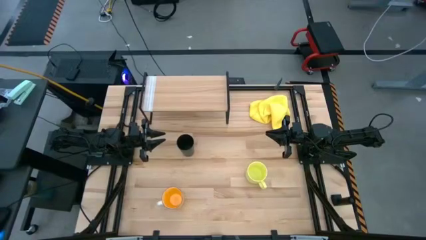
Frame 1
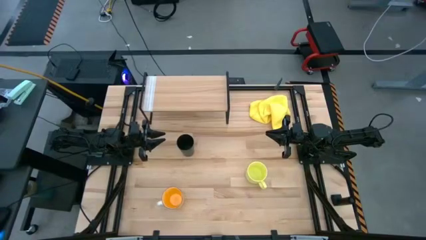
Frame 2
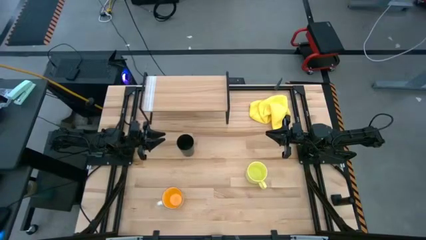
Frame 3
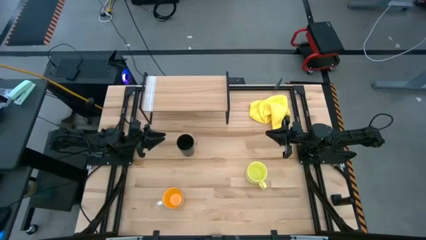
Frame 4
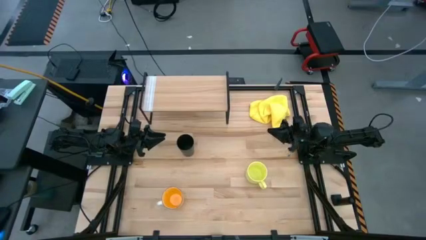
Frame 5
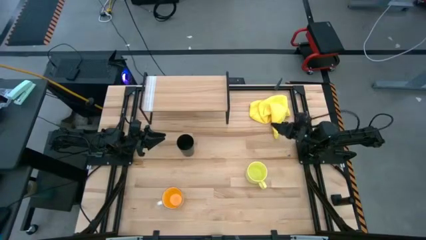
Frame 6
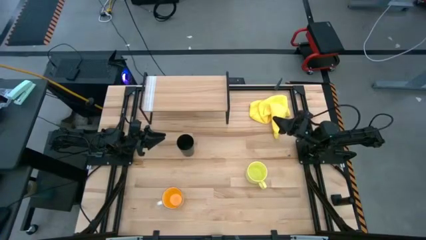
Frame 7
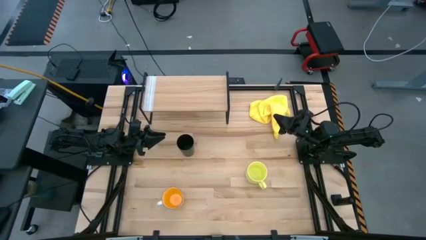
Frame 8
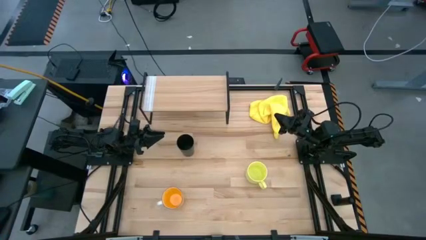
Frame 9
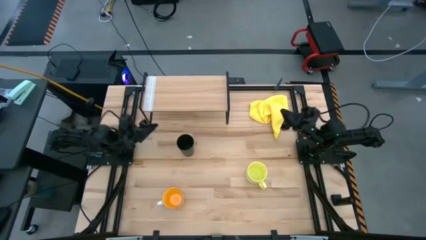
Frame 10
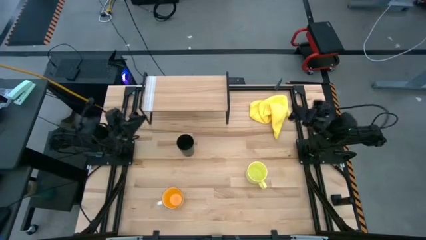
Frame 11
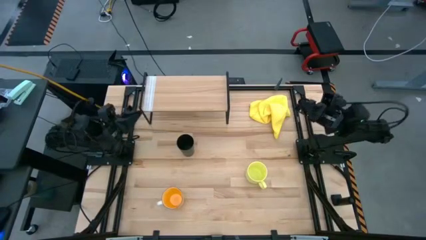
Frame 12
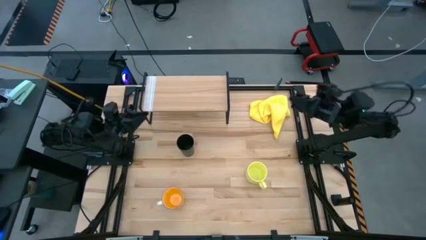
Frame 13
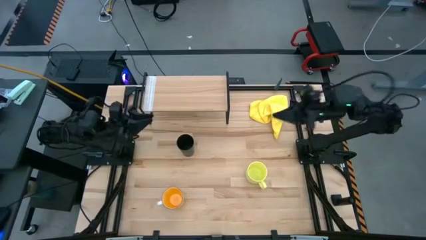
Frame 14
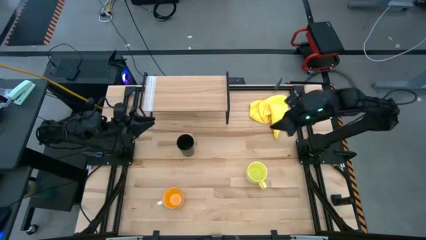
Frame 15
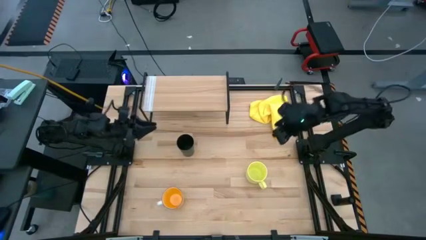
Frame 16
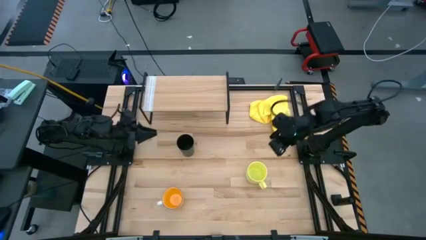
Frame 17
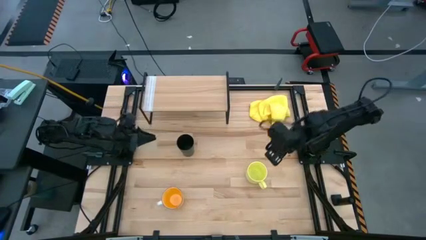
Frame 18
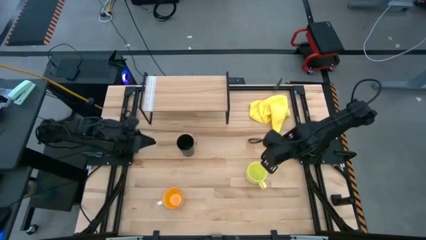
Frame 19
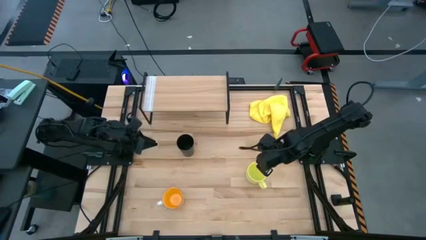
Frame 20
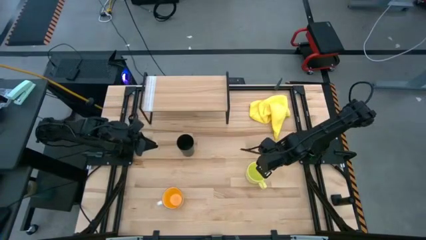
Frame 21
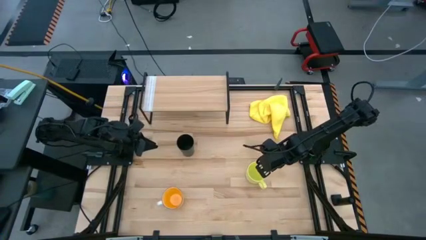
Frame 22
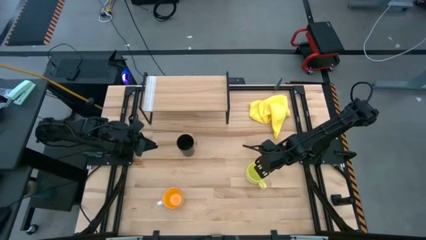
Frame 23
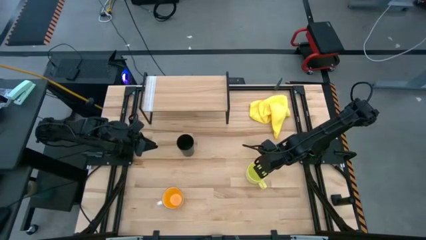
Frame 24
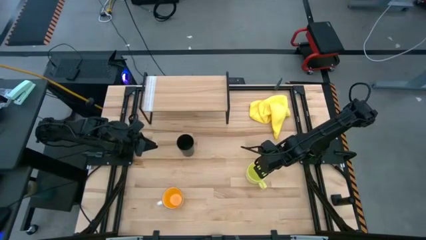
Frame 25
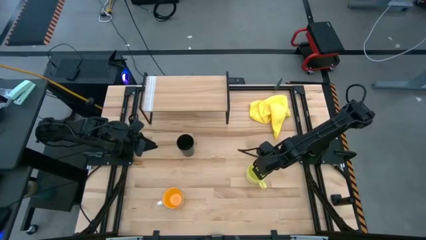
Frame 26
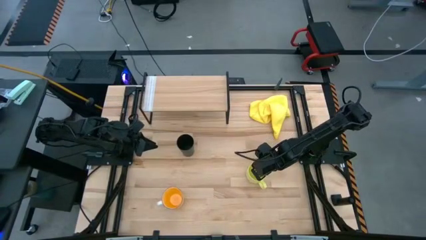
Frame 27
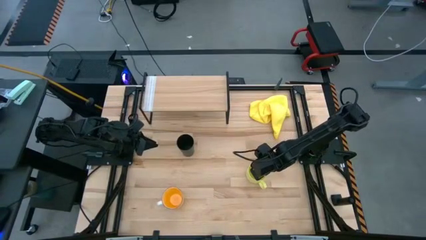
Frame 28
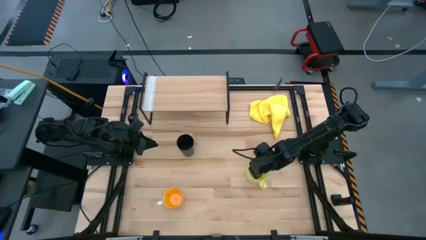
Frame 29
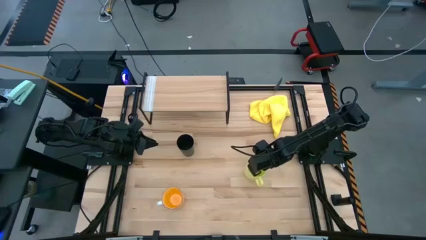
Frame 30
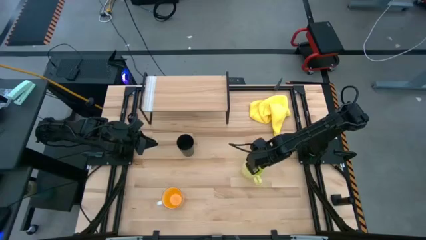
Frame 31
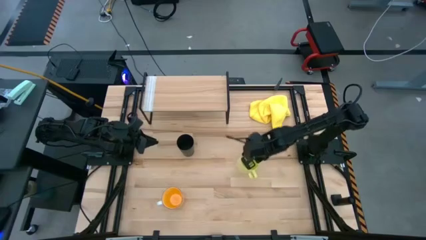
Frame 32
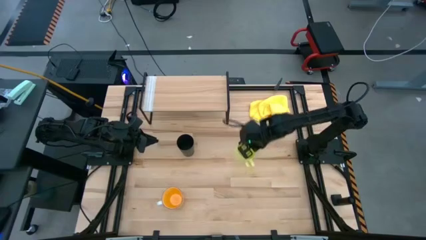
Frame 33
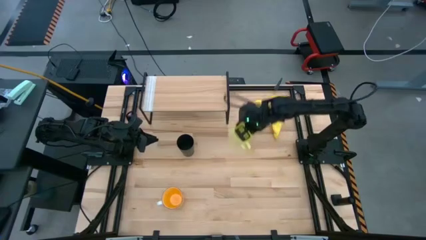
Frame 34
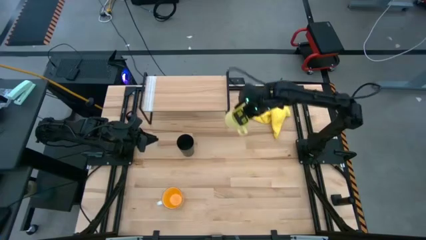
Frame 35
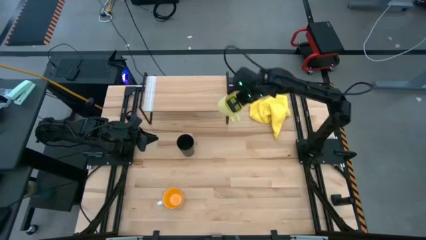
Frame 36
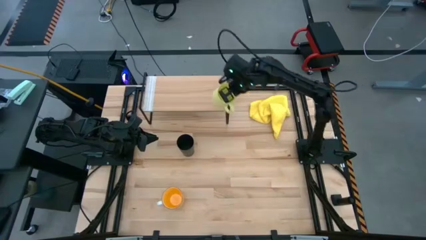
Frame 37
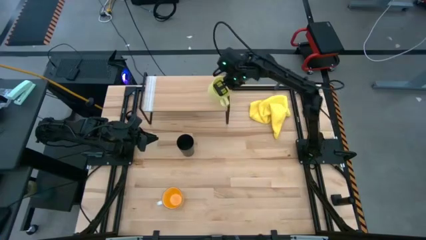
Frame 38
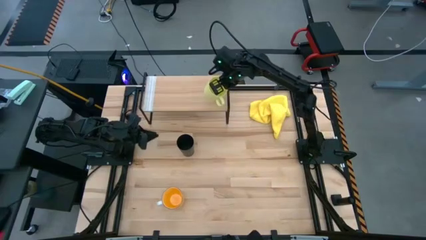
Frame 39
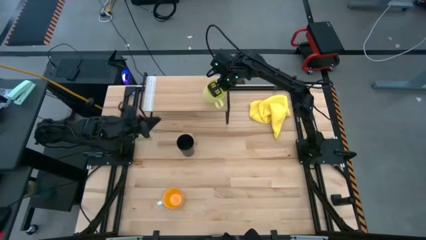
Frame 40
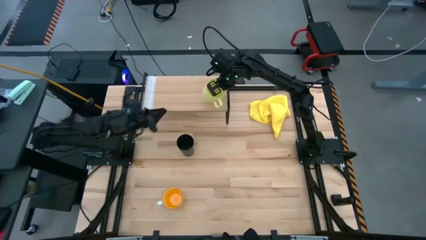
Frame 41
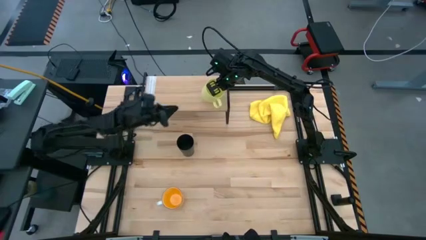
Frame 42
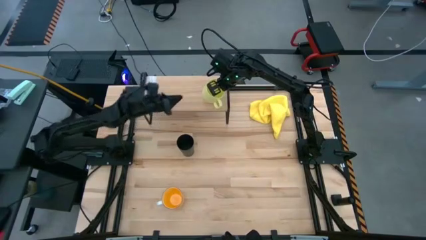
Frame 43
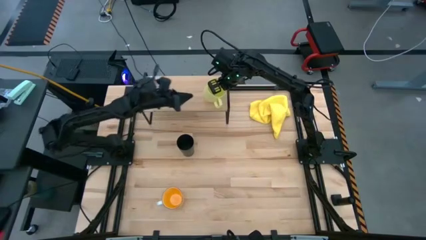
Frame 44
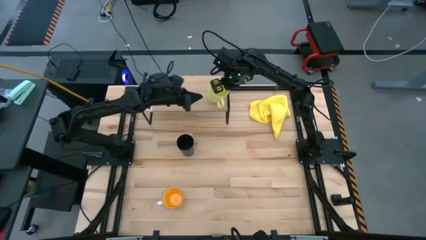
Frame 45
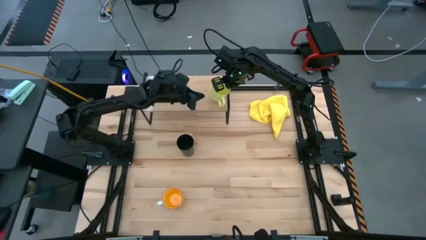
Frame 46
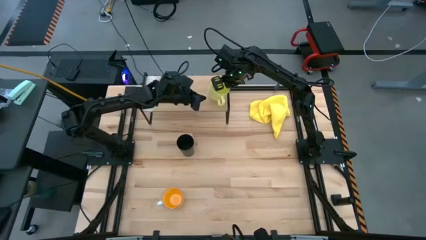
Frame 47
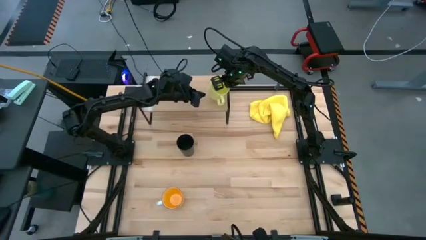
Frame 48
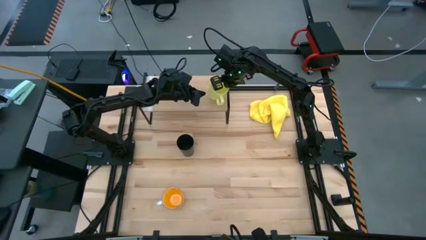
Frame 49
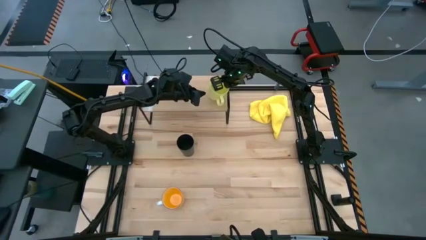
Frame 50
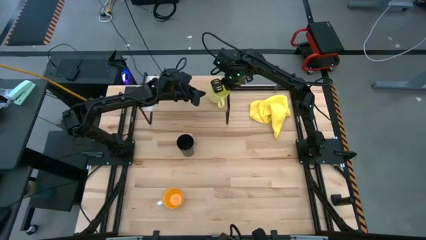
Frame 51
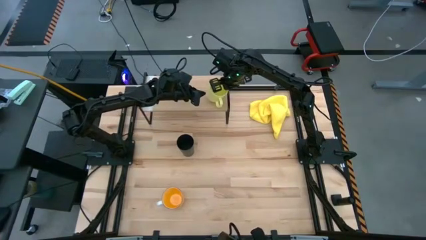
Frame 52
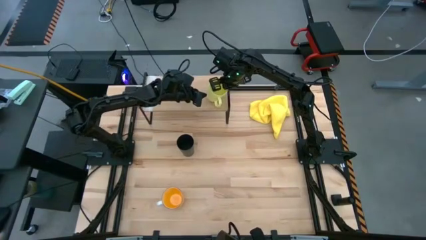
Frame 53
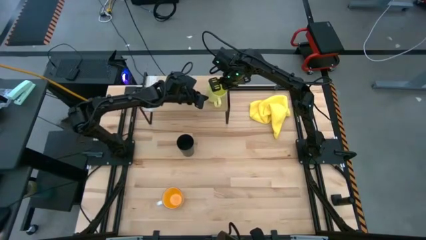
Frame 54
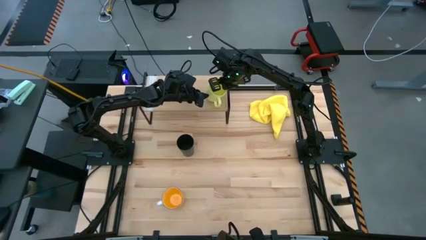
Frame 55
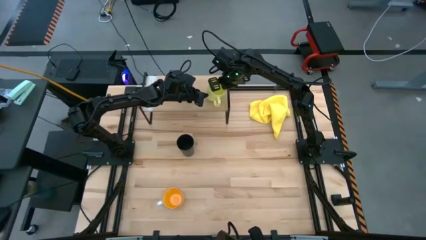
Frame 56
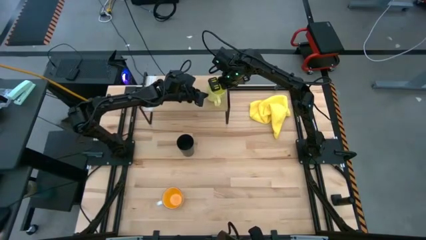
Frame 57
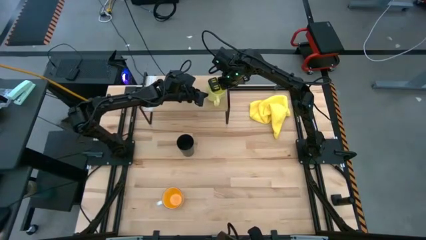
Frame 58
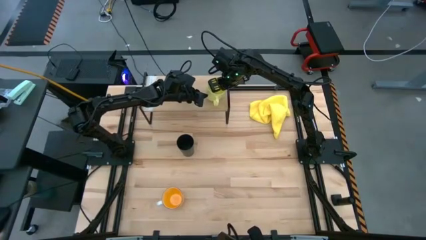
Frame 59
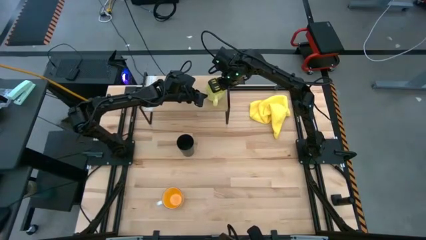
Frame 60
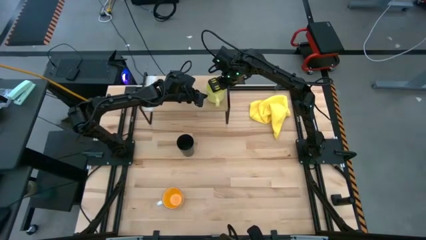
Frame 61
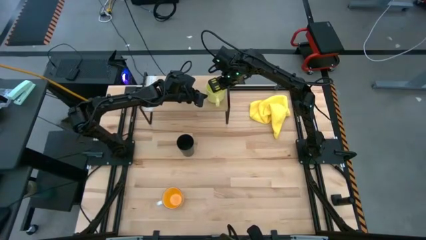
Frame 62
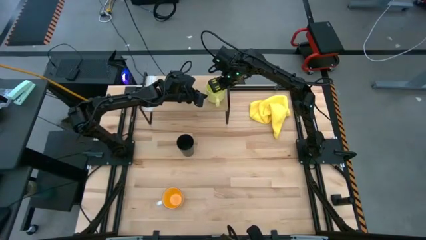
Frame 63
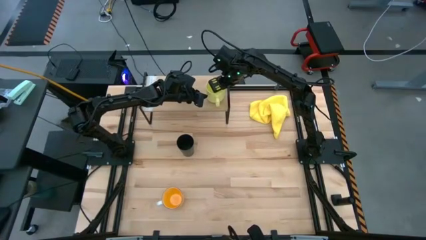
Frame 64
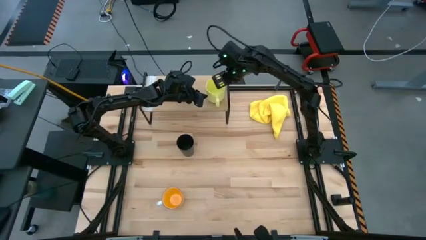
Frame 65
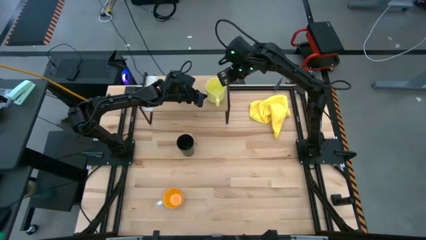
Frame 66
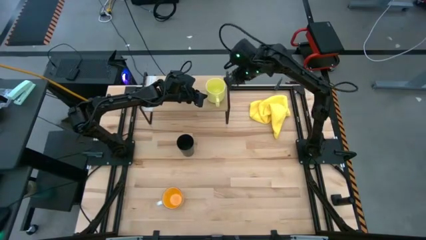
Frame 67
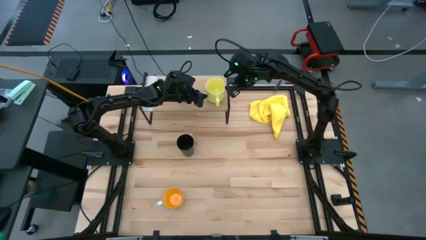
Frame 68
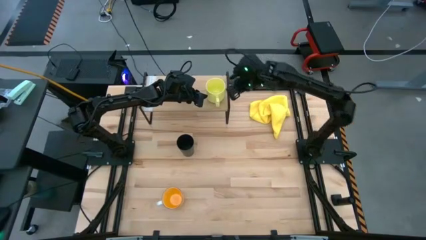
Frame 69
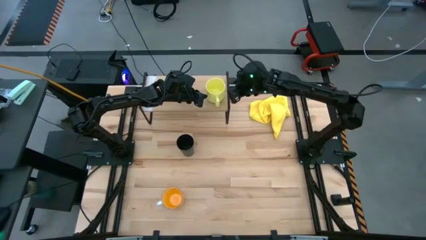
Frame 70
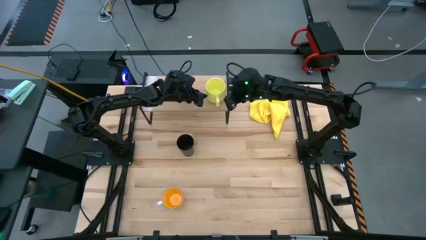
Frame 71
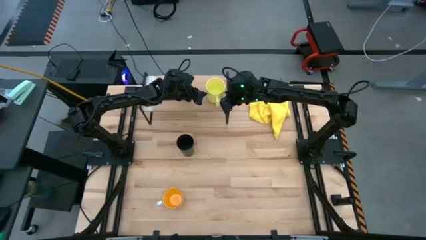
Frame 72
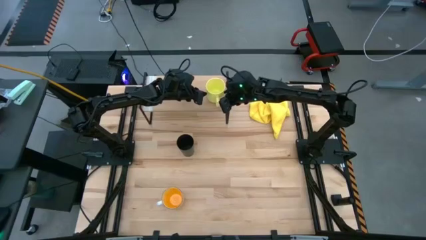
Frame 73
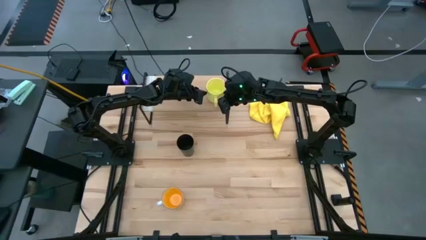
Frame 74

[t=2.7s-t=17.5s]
Task: Stack small to large cups/mugs on shelf
Put the yellow mug on the shelf
